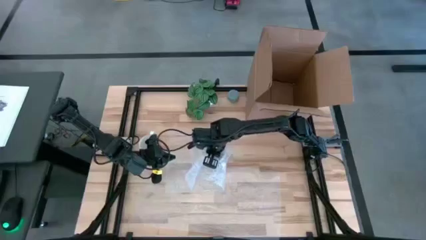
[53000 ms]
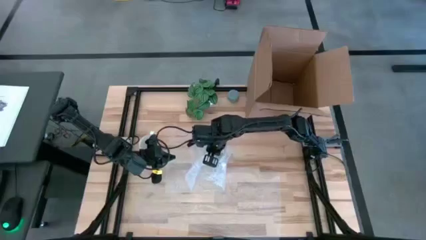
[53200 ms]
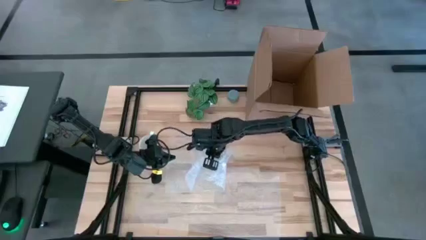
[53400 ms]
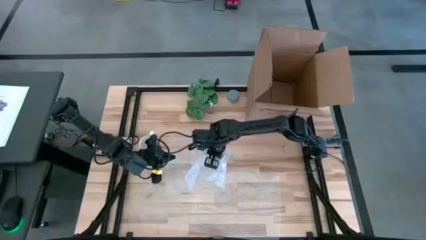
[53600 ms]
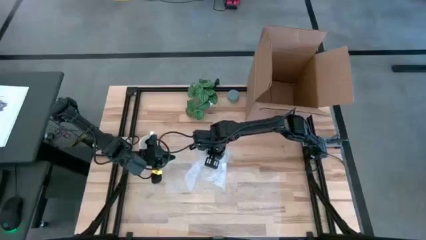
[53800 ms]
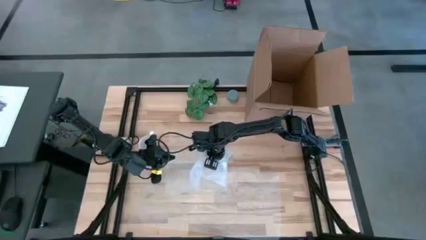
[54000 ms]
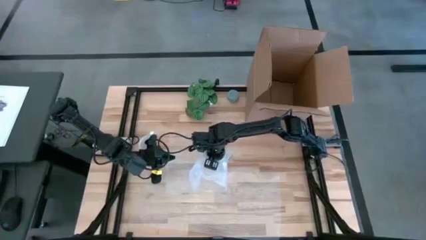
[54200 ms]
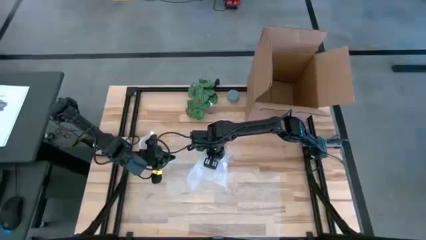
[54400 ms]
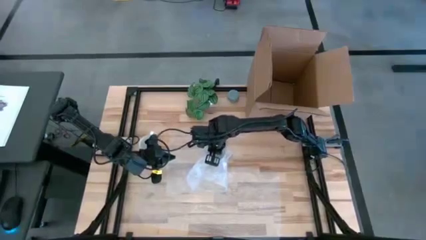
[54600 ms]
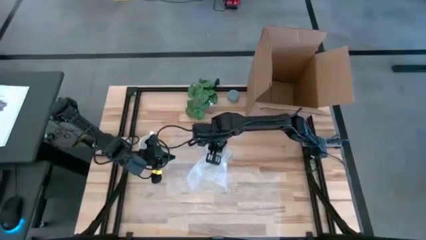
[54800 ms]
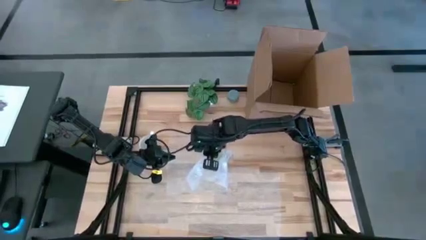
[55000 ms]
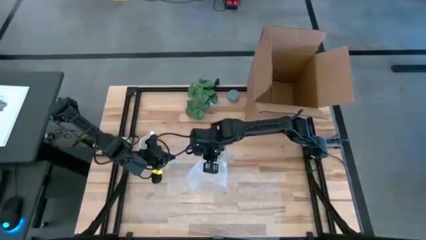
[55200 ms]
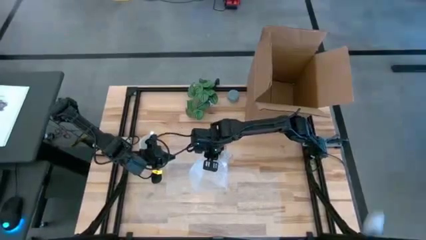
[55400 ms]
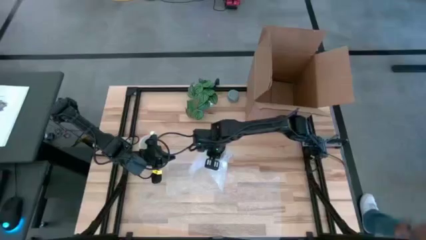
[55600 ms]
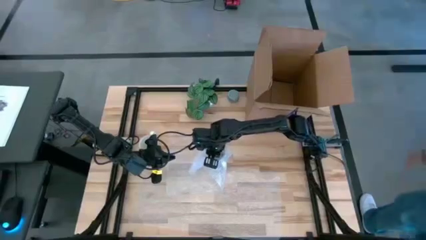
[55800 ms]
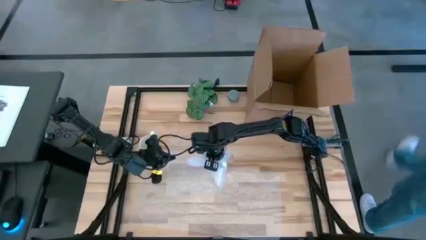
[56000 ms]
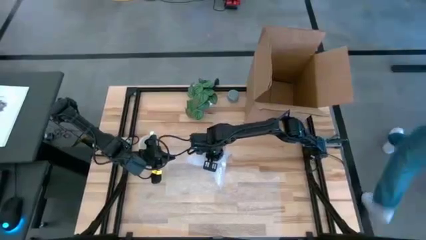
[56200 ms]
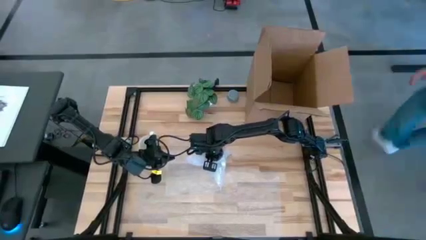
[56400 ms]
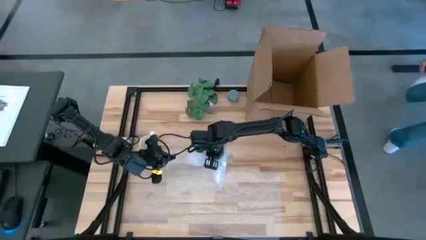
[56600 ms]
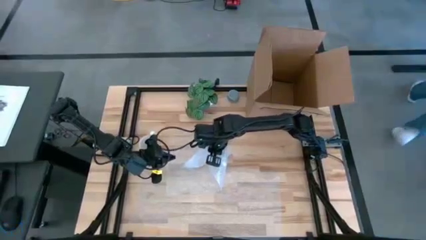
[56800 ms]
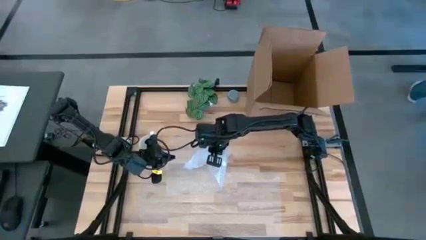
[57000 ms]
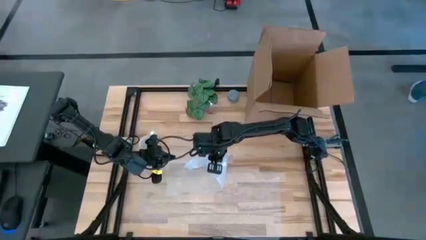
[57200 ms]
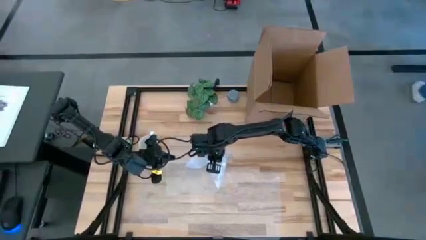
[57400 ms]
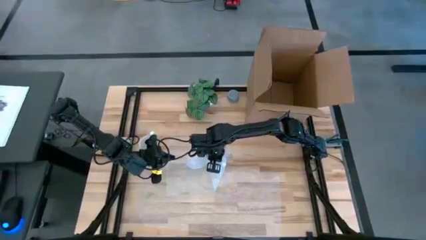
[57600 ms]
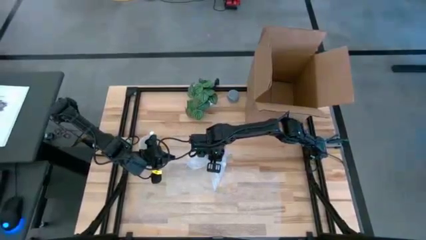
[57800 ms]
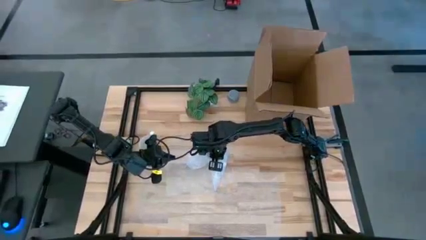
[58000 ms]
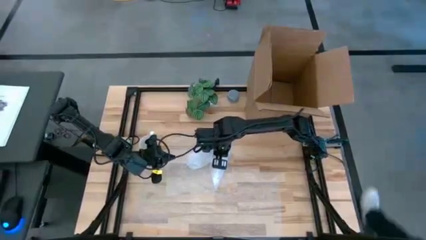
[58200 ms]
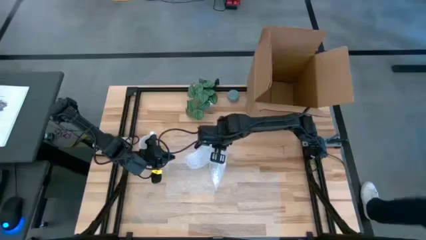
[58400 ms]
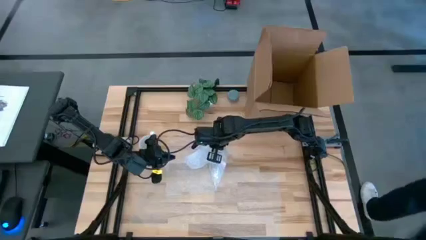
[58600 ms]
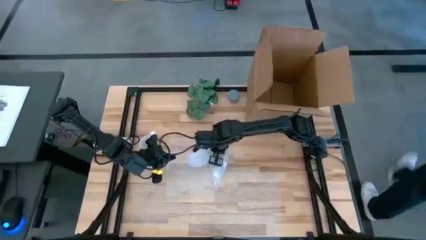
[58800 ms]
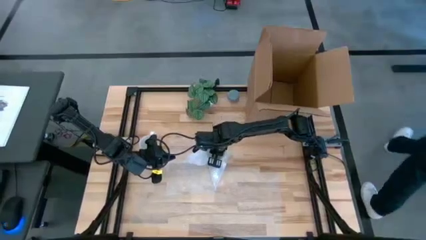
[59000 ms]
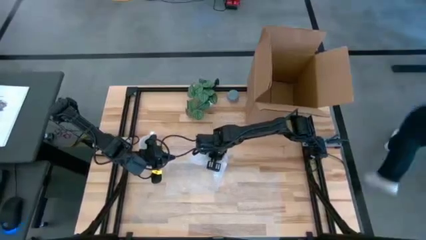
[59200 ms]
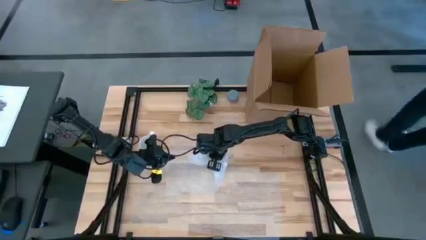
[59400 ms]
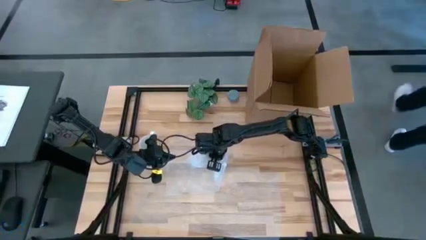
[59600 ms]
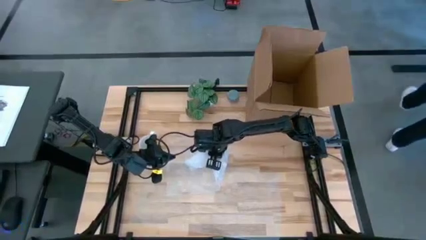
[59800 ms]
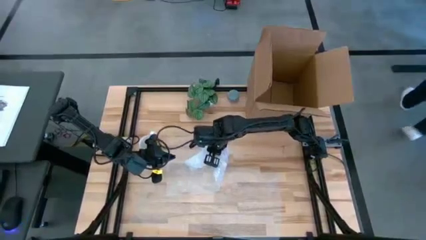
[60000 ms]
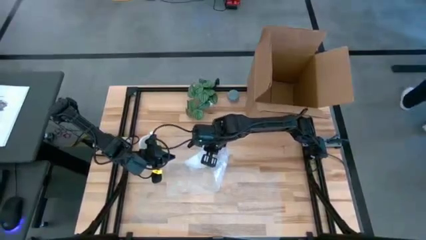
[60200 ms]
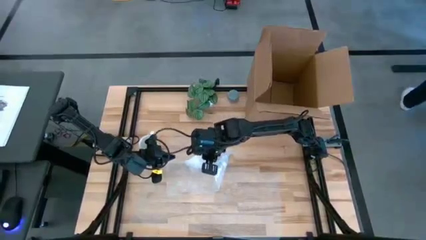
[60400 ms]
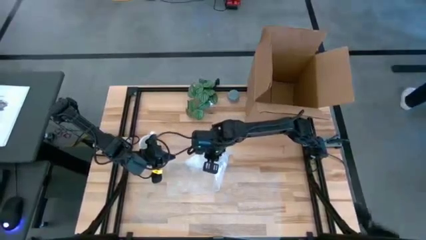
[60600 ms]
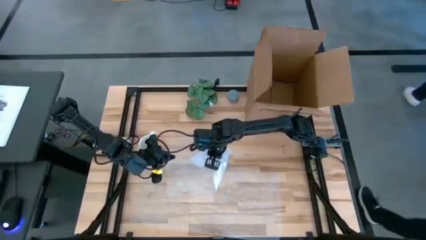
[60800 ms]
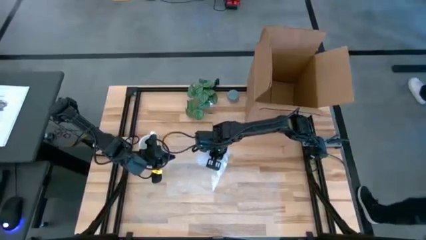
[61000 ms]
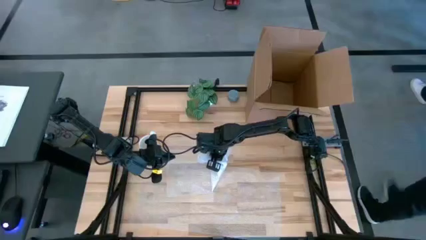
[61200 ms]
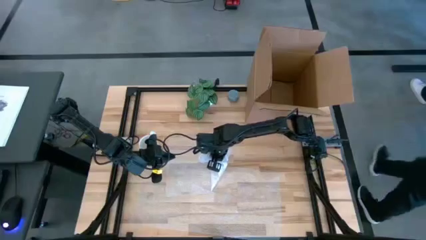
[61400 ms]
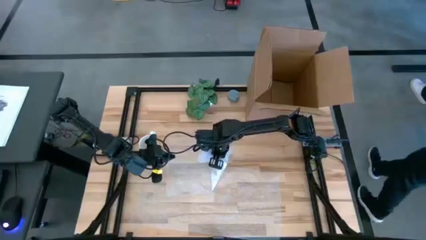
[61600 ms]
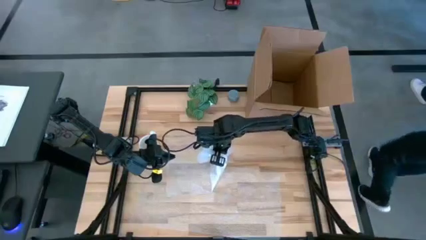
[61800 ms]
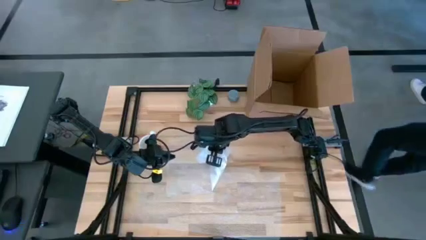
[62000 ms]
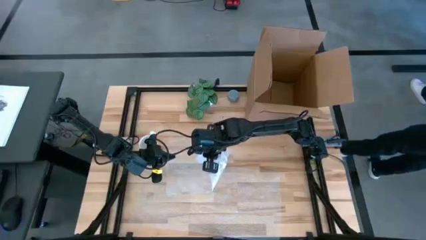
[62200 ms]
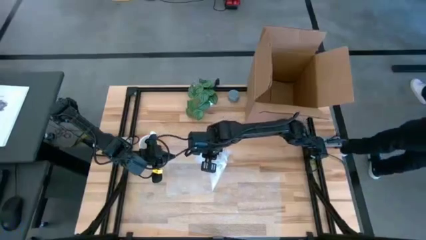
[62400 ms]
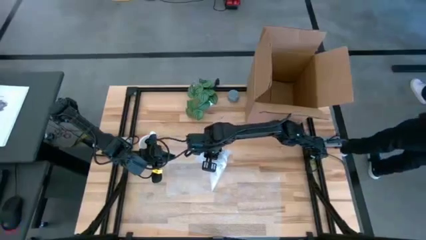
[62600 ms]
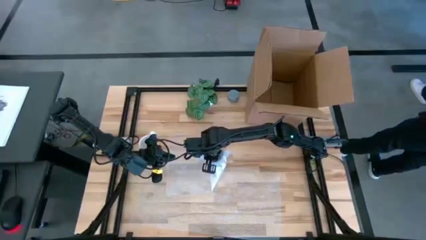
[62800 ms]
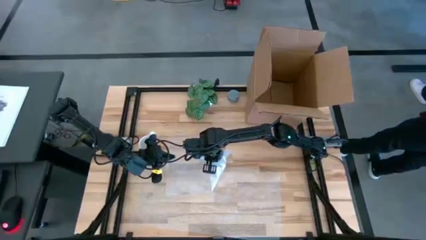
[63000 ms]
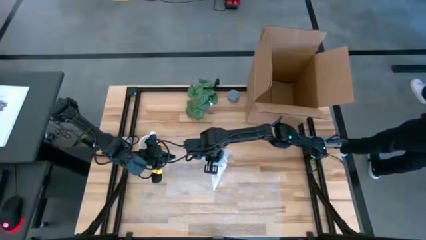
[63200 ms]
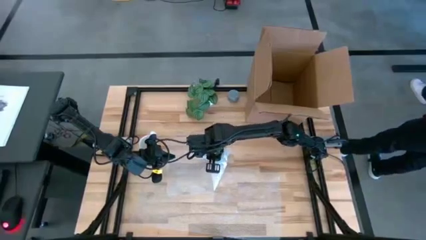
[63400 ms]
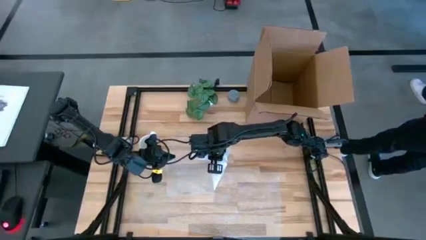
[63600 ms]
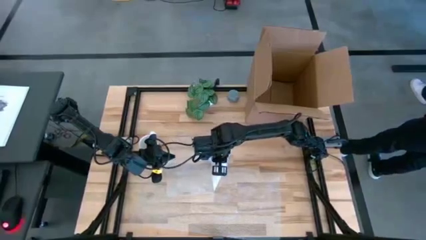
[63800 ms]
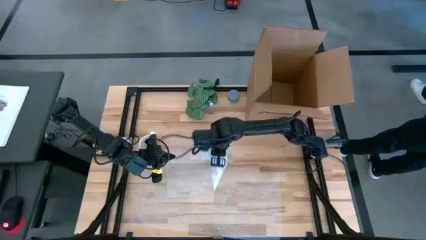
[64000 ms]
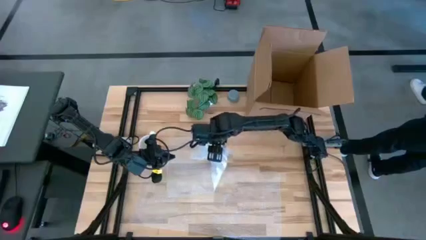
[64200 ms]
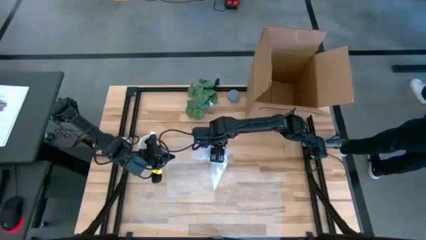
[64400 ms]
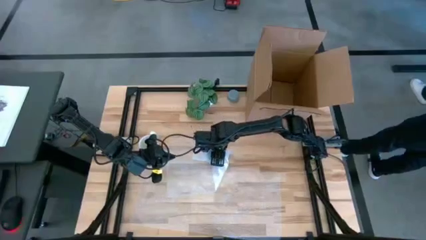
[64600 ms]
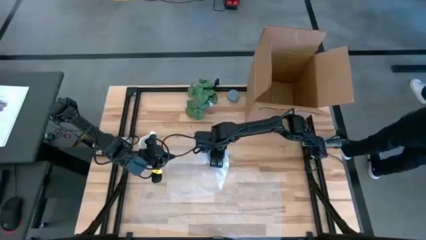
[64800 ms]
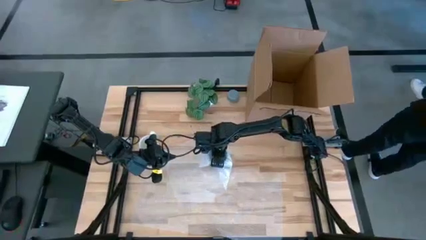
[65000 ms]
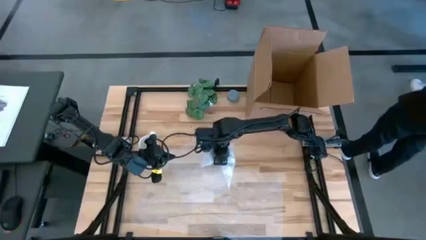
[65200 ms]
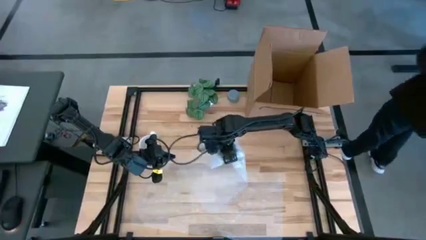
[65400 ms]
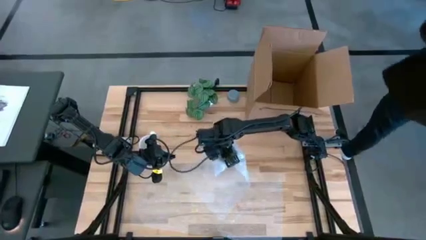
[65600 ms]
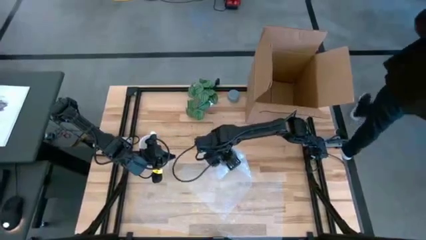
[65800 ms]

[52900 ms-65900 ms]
Task: wrap mug
Wrap the blue cup with the bubble wrap

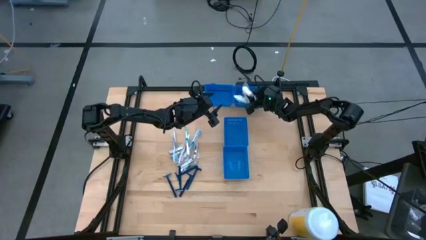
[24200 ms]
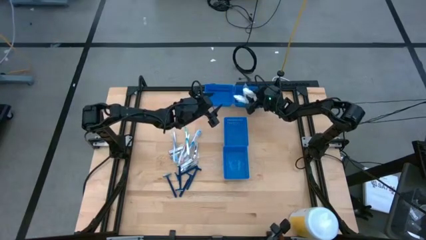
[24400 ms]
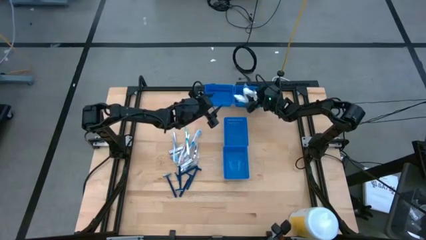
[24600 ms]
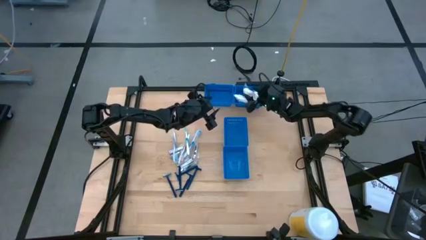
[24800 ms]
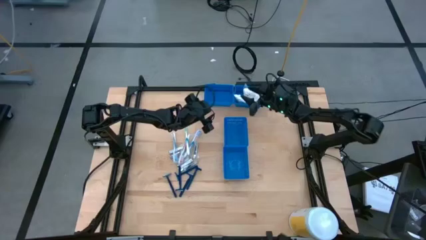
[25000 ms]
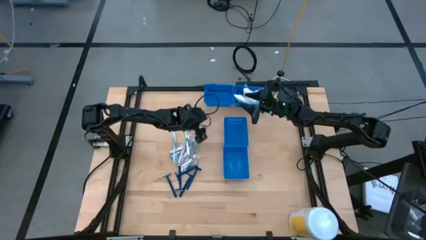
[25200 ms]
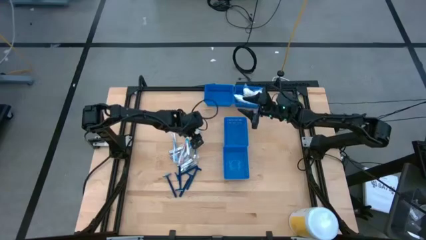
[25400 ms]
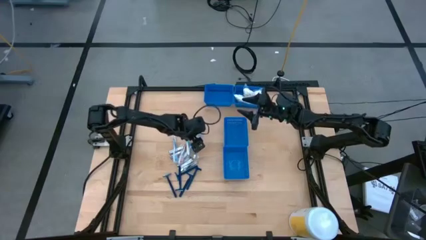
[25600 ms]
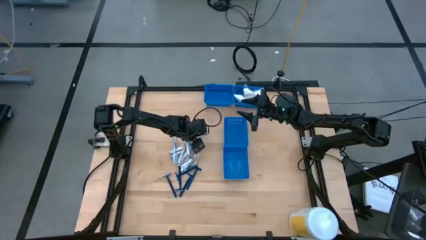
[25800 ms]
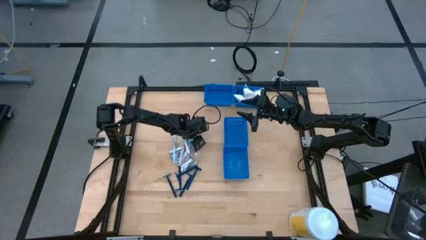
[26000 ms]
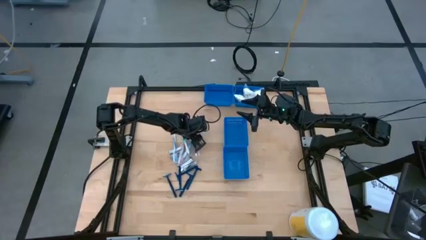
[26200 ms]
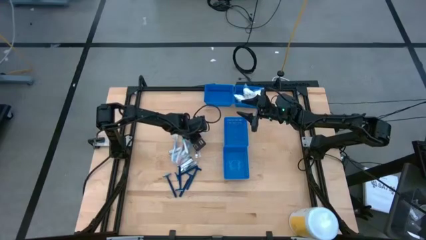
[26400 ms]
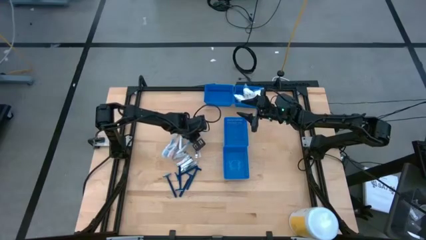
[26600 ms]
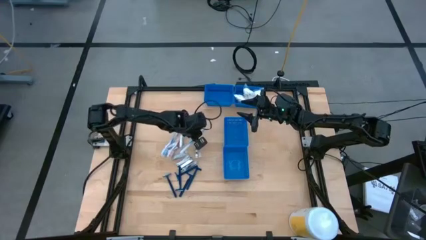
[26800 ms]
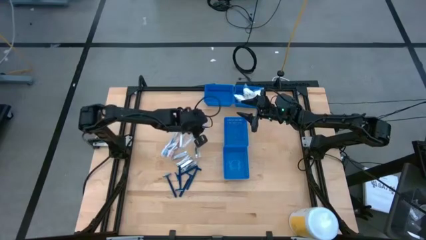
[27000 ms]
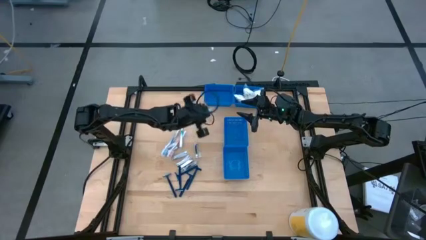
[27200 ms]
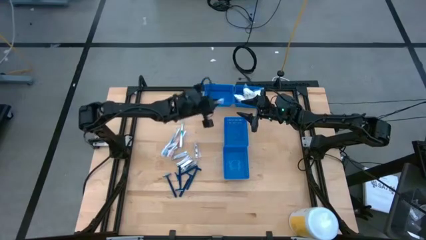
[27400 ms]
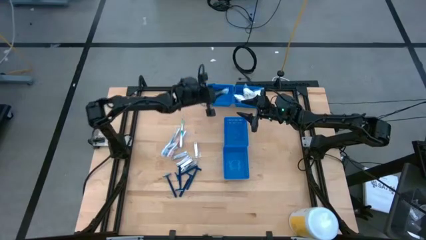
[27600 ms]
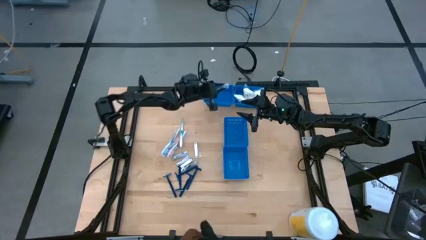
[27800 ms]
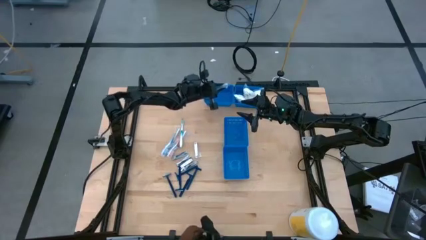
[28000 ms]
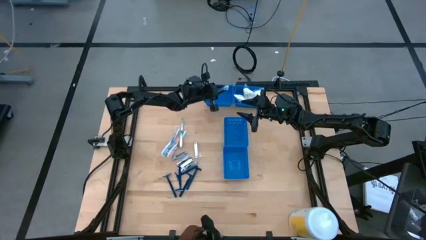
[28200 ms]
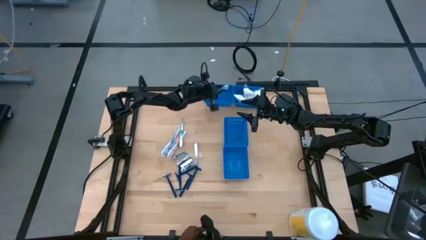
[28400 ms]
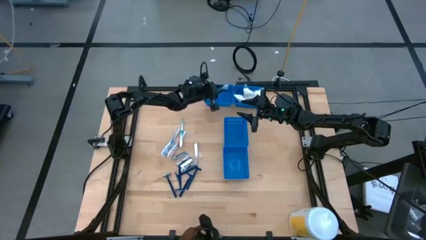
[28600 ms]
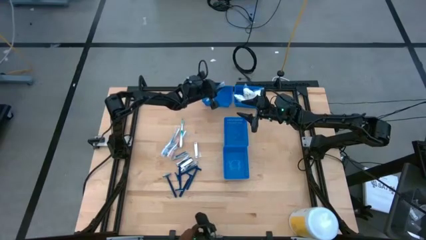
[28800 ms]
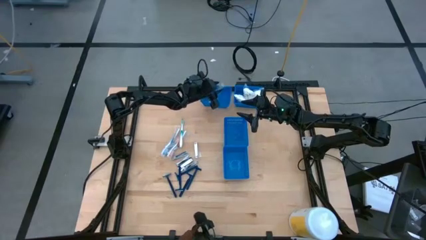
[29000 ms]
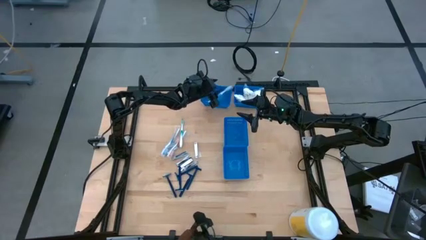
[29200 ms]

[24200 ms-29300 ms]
Task: Pick & Place Travel size toiletries
Put the blue toothbrush into the top left blue bin
